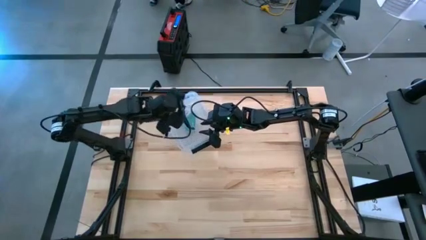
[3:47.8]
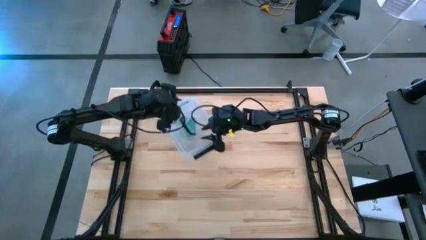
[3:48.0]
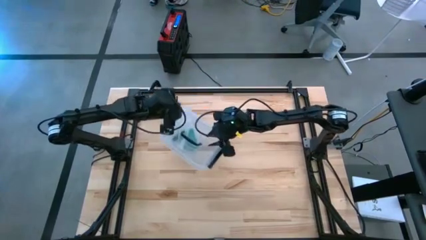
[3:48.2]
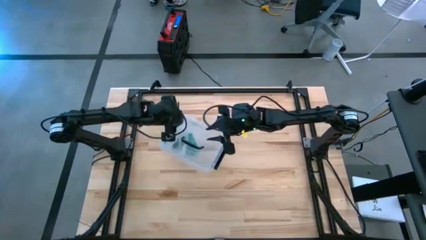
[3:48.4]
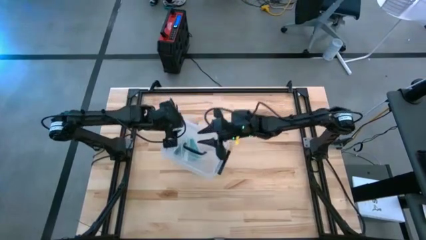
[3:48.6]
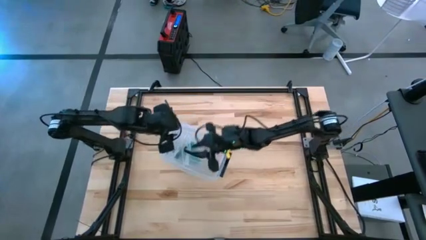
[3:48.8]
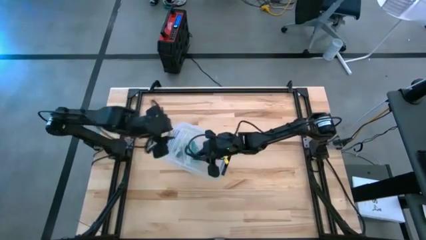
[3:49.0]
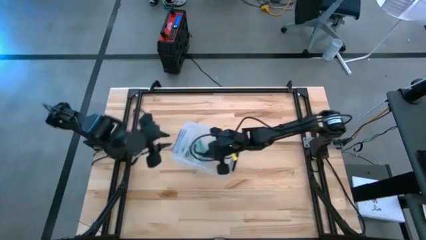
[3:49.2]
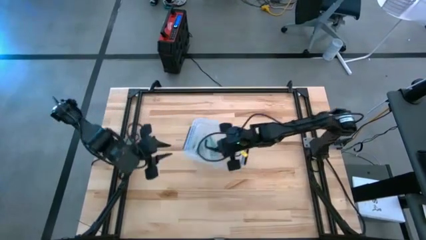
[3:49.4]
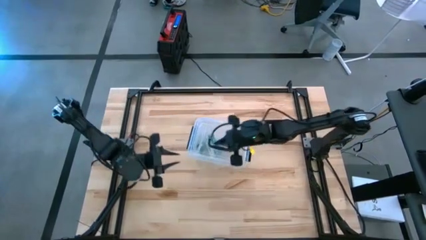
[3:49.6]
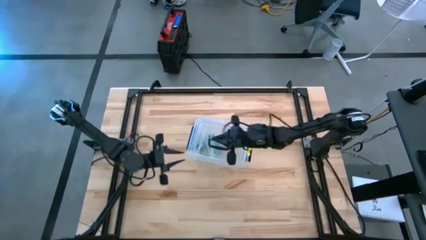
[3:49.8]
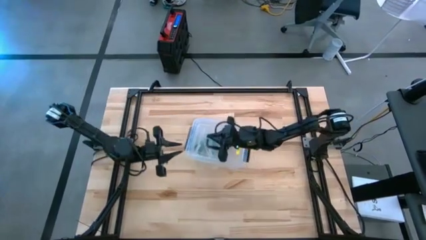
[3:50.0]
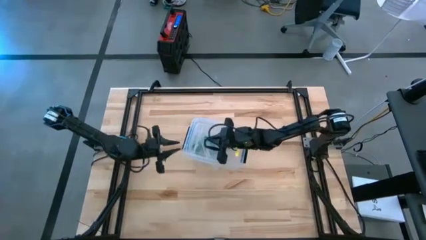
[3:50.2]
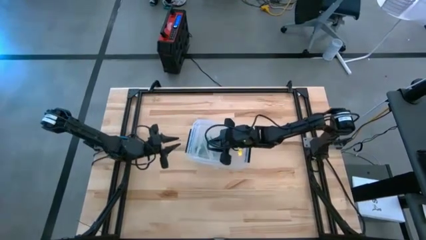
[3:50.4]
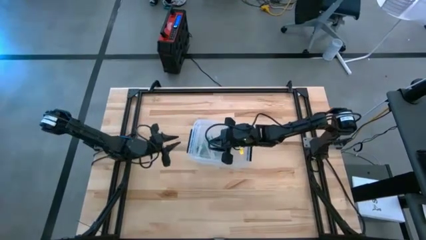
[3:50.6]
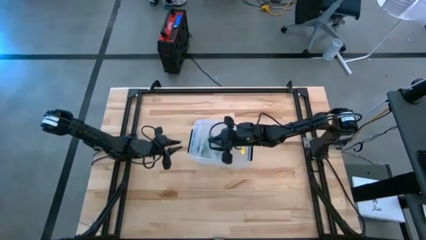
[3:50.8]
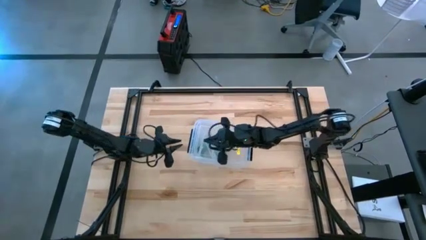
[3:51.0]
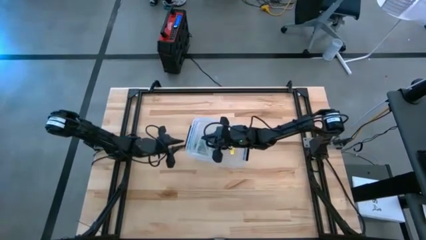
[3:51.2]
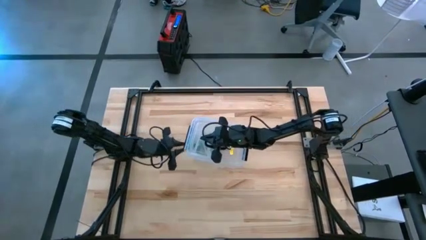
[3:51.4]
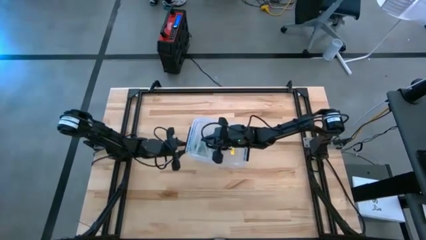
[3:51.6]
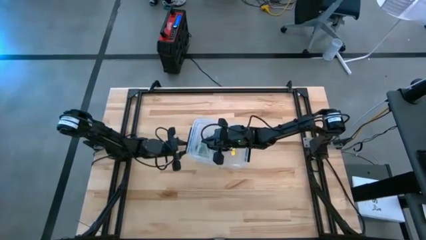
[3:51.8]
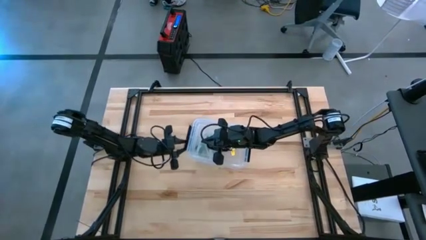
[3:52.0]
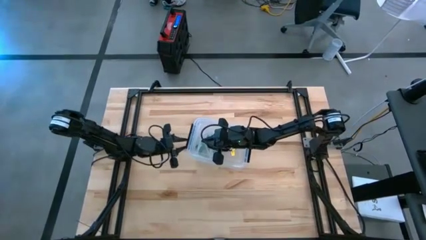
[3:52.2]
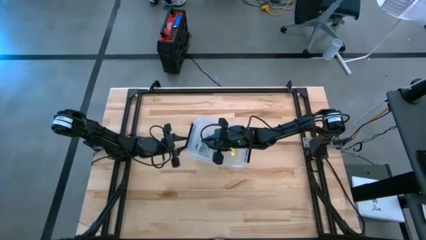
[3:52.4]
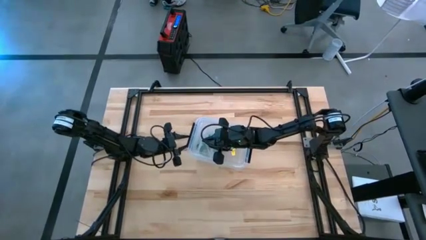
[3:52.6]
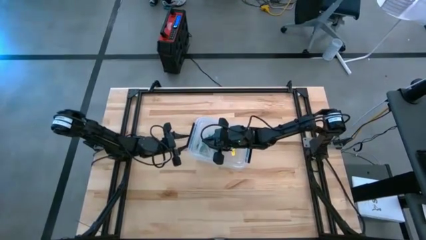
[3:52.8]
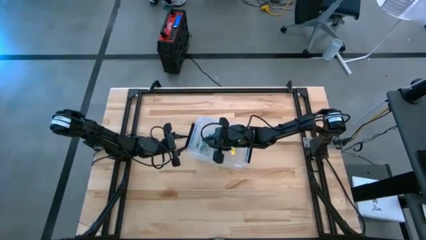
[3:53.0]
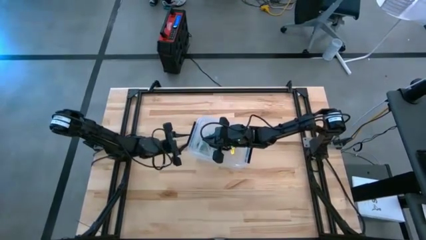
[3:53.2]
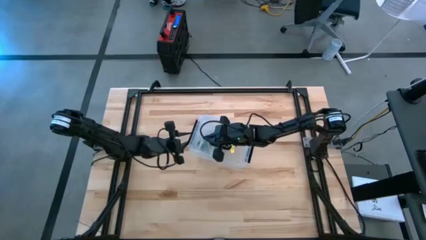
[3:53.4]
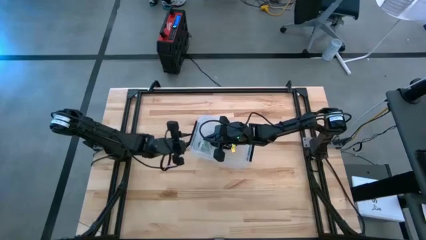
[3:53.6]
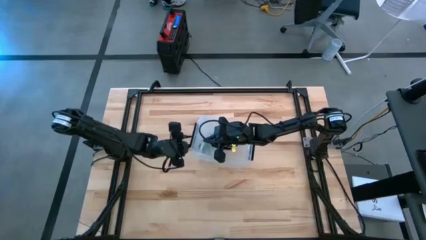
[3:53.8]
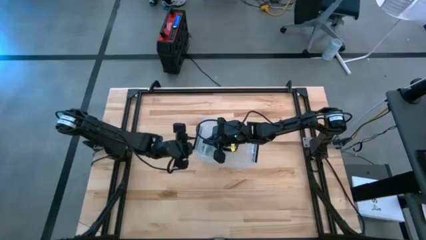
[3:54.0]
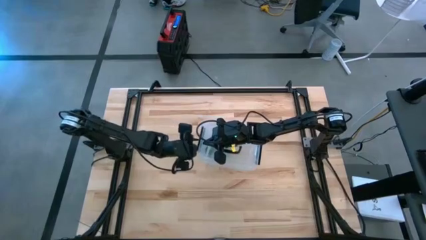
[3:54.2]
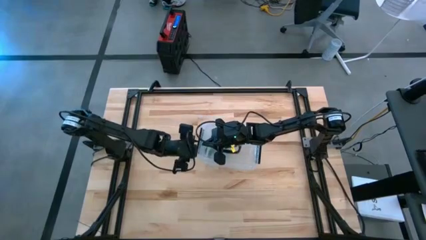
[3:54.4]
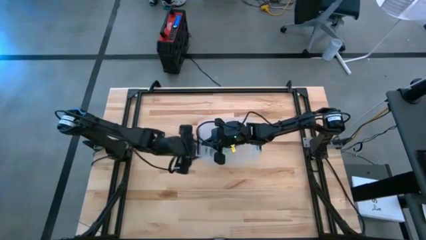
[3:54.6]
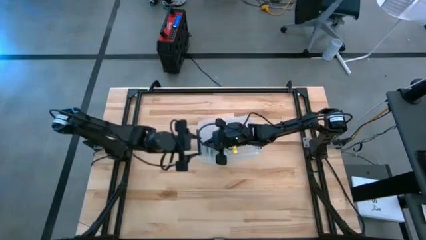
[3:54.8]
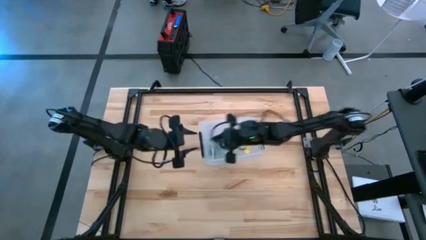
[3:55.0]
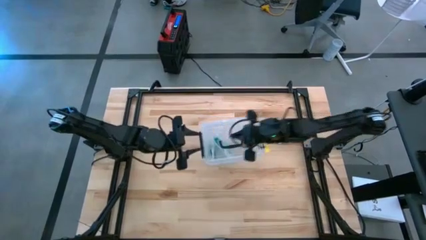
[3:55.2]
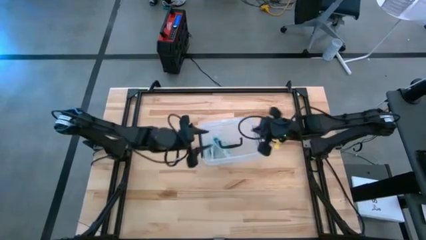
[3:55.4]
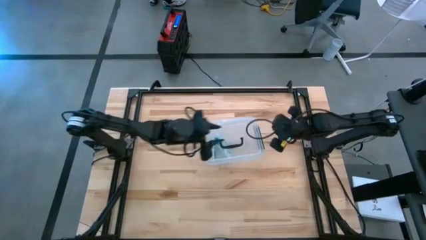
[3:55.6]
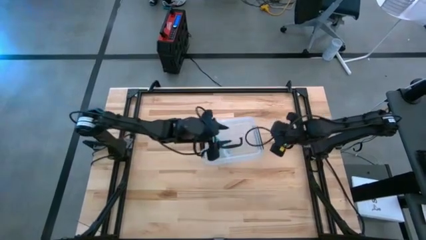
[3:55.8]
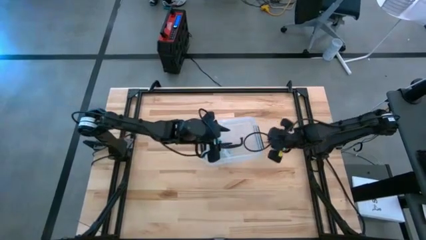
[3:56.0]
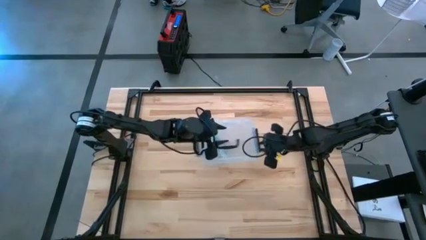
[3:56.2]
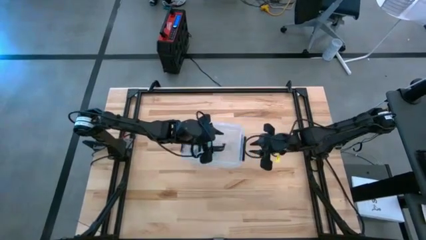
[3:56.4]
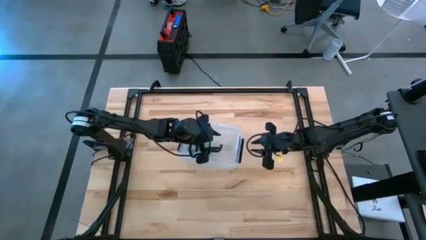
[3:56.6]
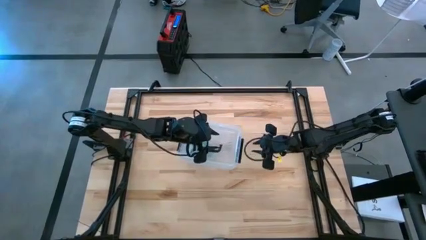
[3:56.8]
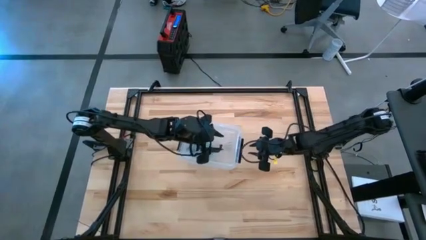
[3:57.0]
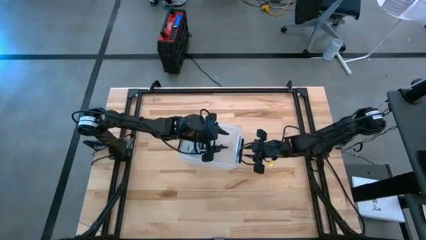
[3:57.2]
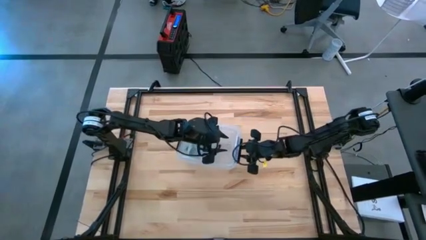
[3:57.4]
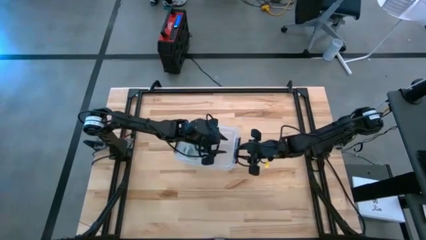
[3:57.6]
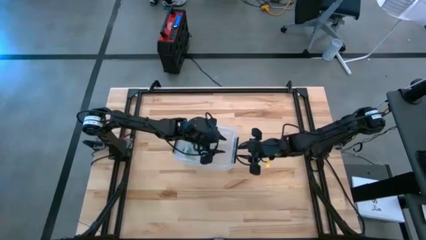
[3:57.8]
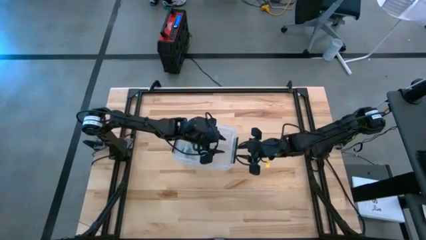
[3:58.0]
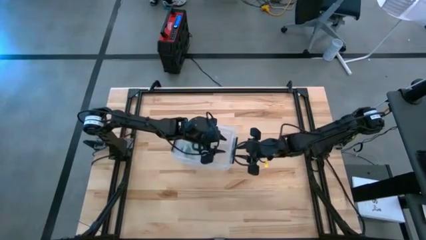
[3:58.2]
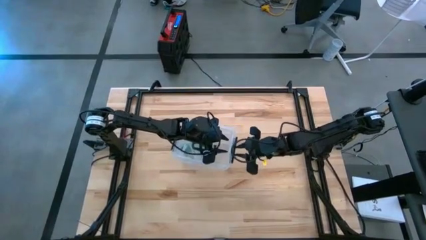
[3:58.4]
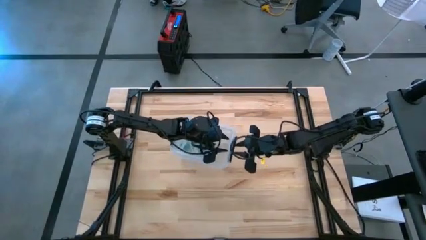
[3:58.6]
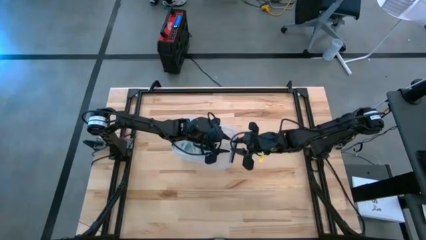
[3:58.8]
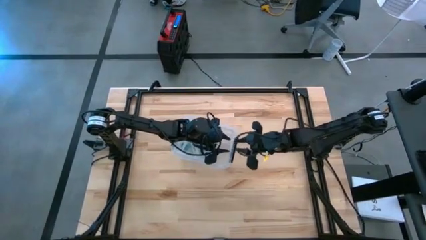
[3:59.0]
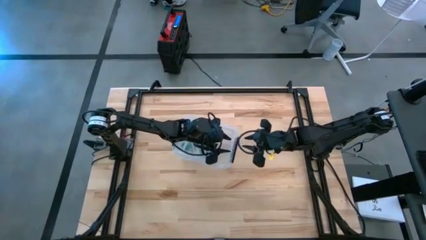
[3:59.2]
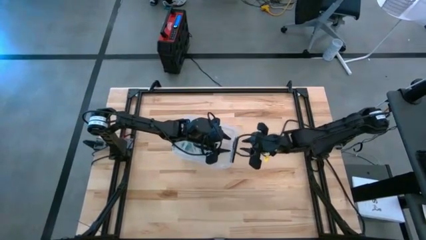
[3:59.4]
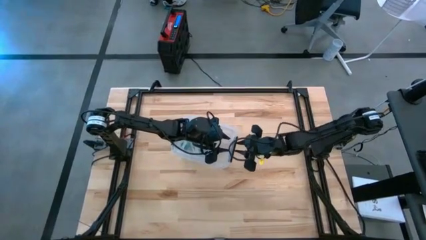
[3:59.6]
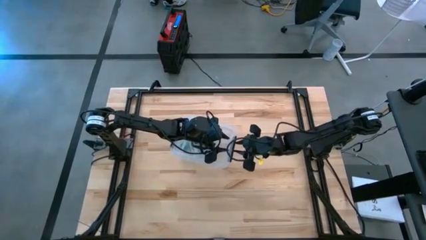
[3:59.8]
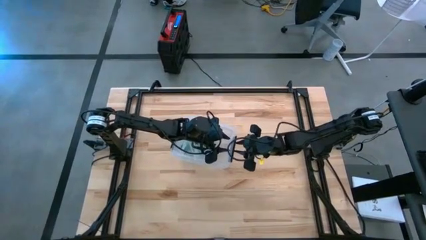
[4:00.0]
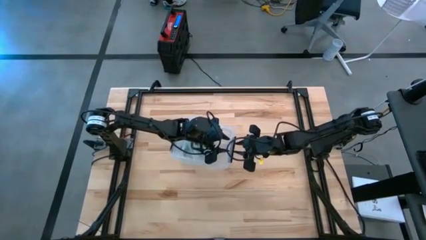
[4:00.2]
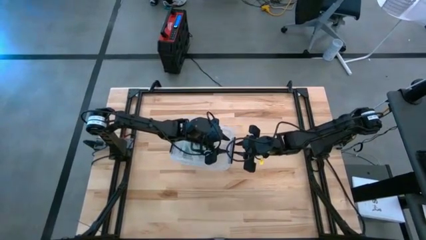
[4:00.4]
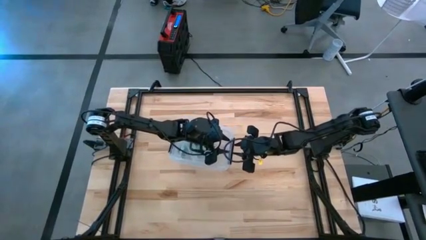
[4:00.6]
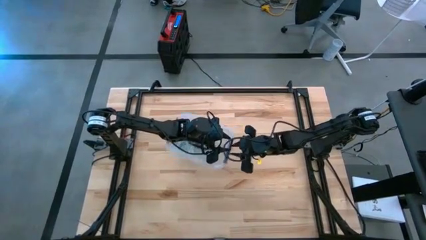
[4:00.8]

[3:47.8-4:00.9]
Task: Roll bandage
Close the transparent bin

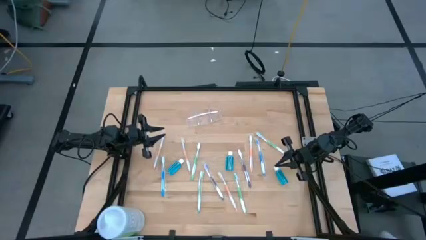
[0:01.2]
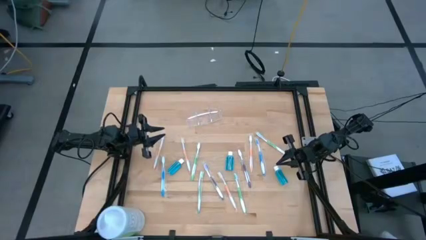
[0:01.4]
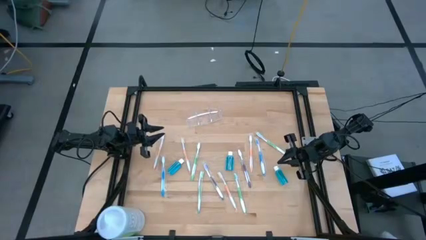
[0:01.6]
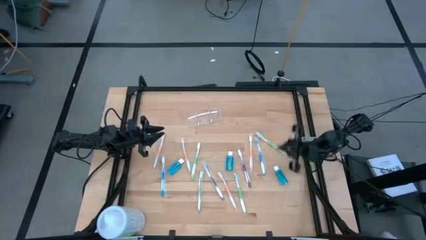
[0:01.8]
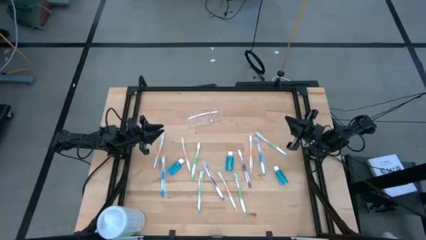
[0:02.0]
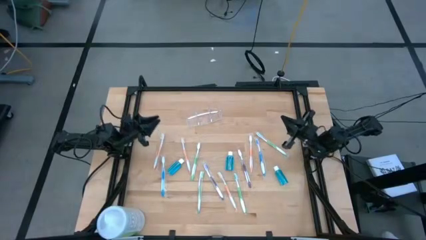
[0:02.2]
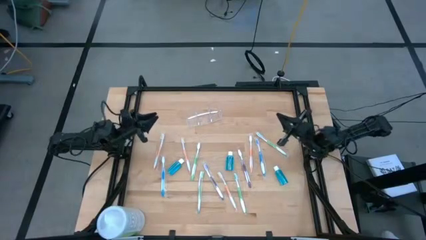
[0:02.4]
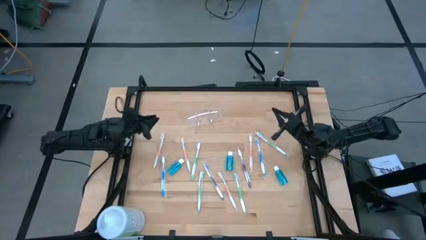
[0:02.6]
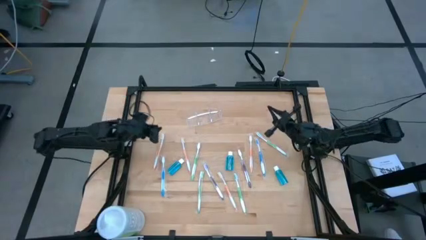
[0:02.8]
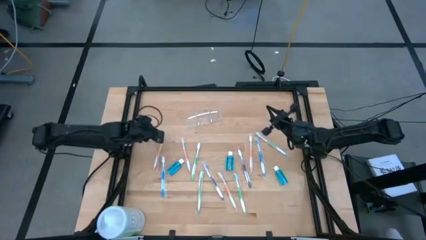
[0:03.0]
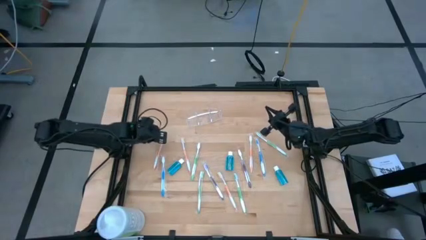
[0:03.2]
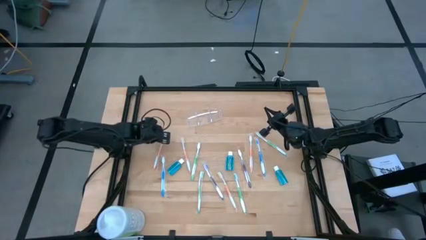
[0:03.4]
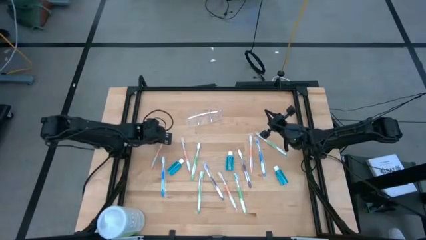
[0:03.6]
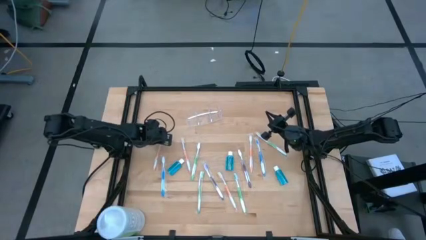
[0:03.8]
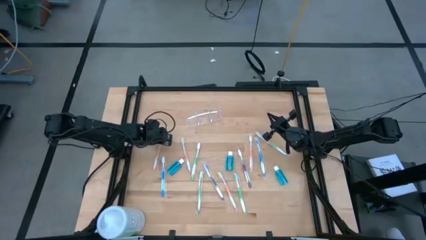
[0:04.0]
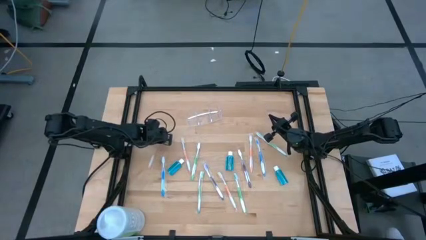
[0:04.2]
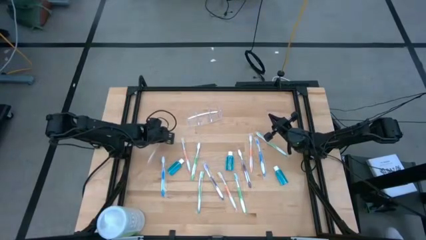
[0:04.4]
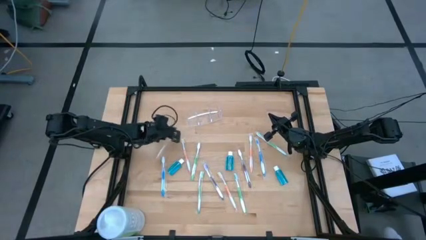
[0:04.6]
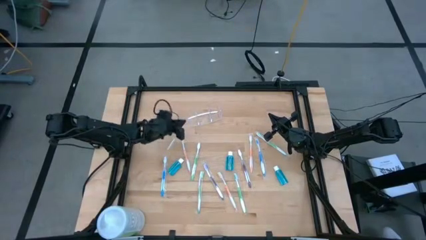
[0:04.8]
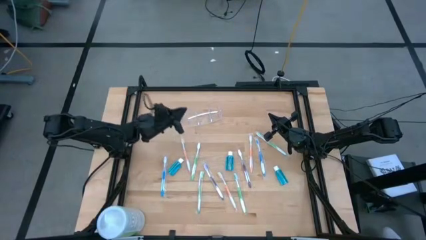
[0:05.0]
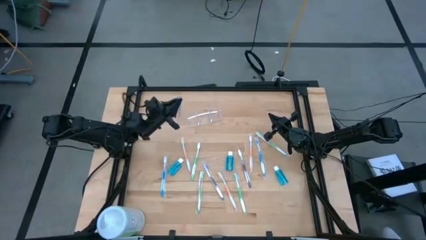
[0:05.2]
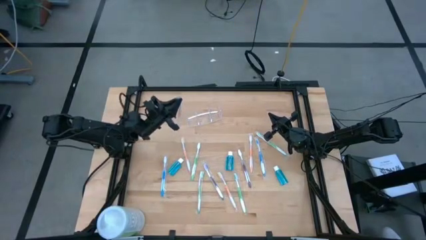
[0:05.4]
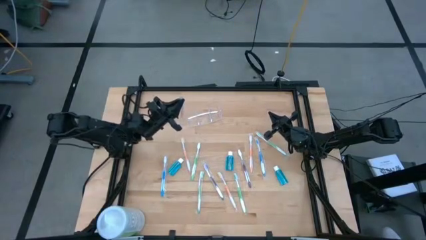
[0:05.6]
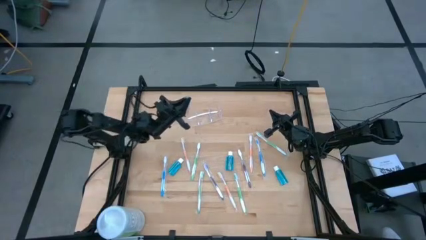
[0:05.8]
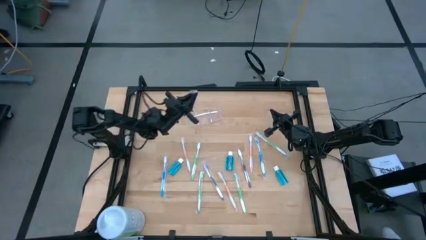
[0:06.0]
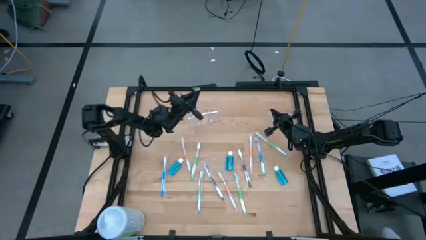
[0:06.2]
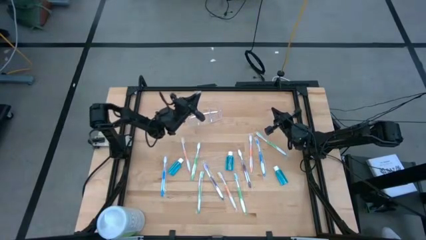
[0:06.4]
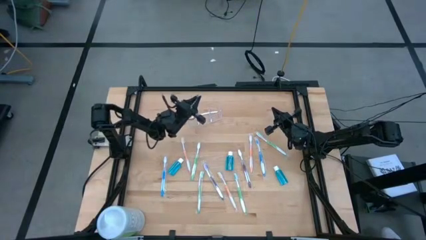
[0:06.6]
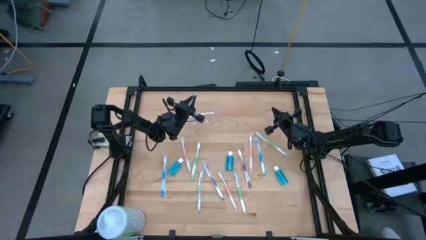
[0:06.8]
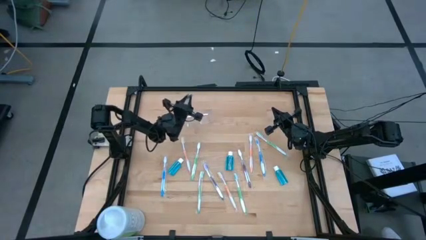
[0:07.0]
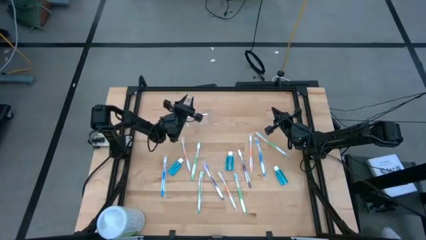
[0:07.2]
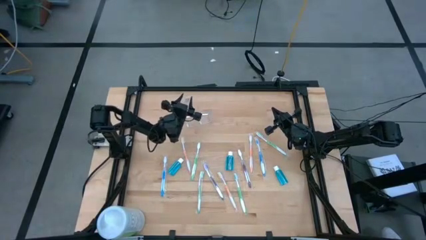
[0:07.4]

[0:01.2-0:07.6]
Task: Pick & Place toothbrushing station
Put the orange toothbrush into the transparent organizer
